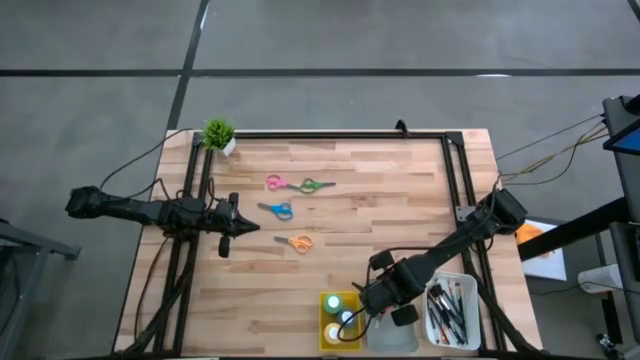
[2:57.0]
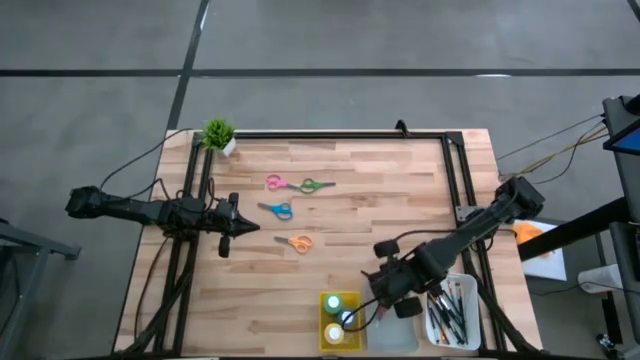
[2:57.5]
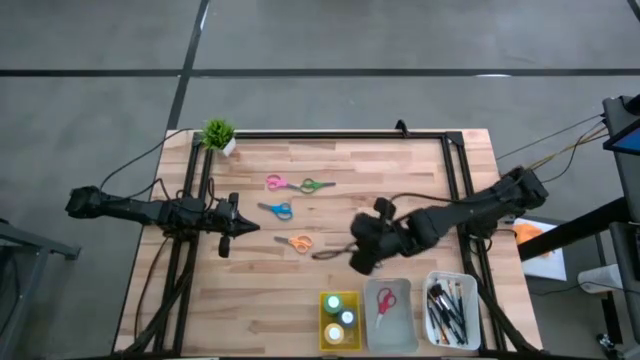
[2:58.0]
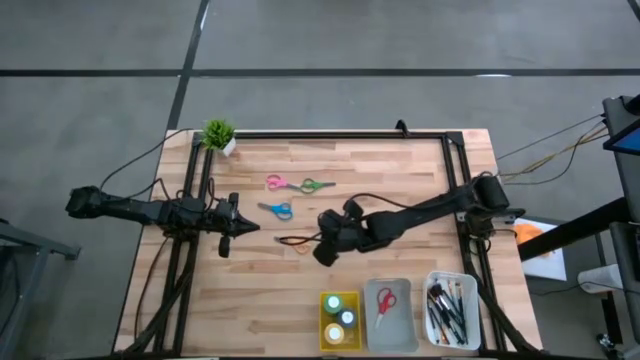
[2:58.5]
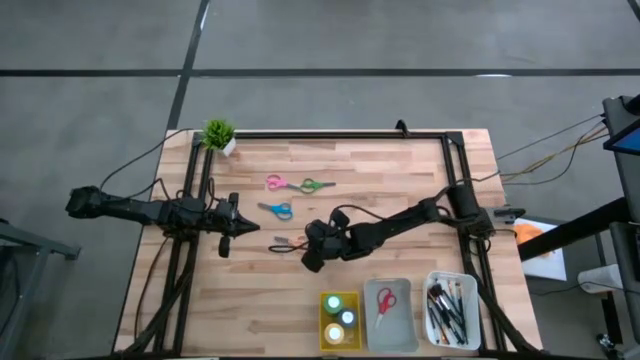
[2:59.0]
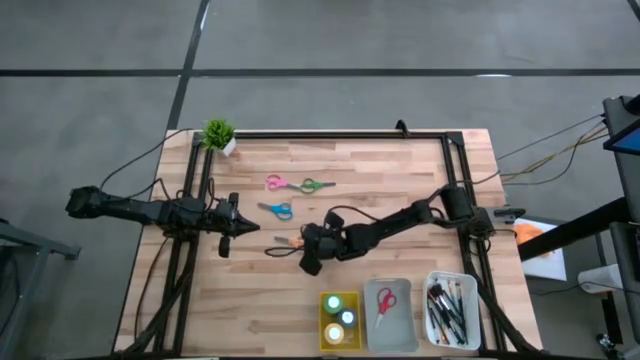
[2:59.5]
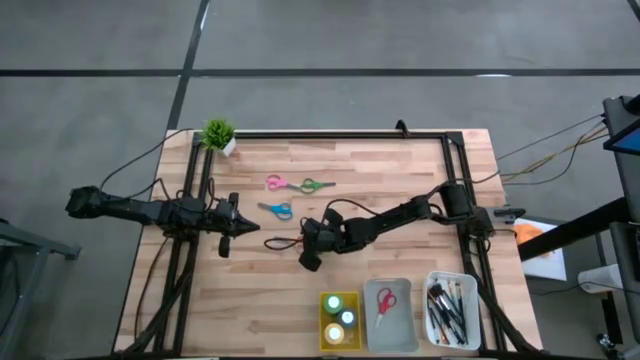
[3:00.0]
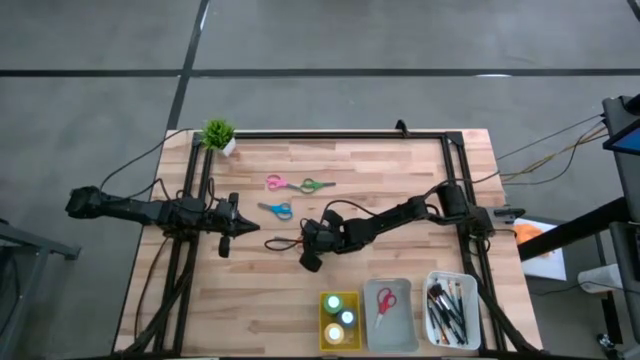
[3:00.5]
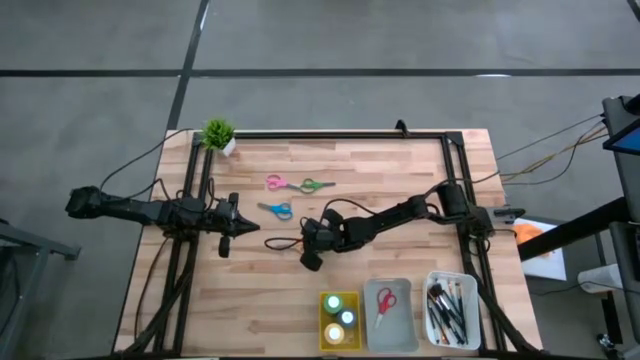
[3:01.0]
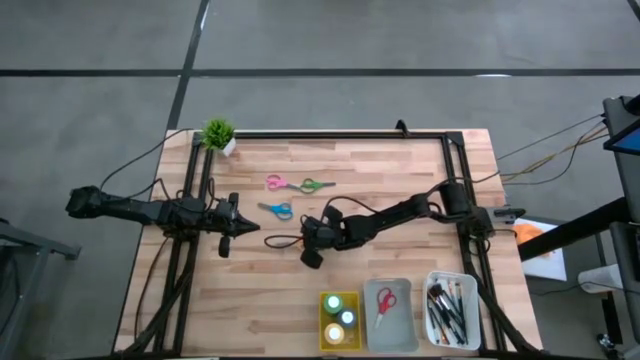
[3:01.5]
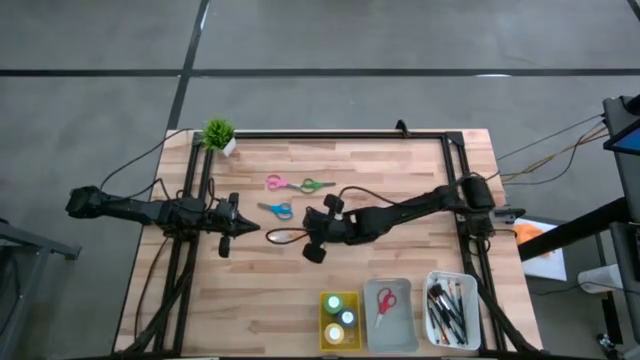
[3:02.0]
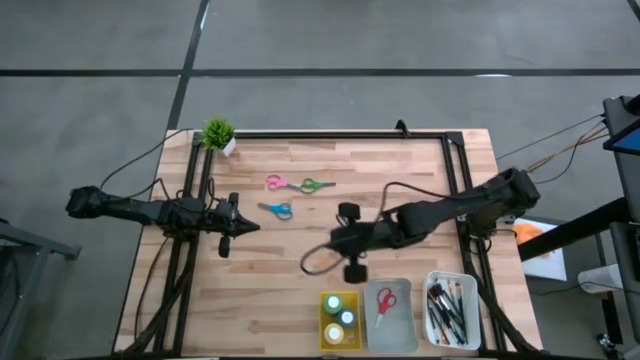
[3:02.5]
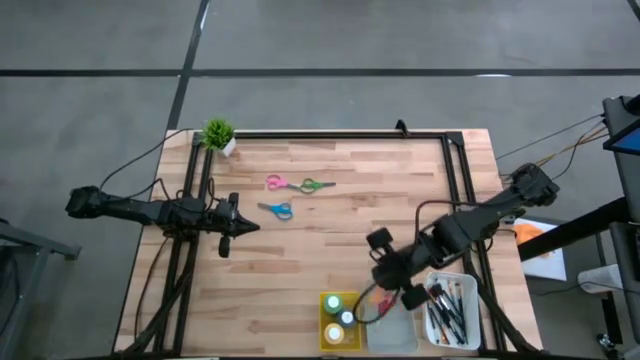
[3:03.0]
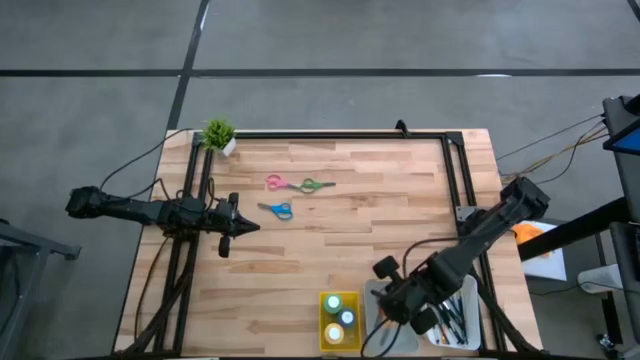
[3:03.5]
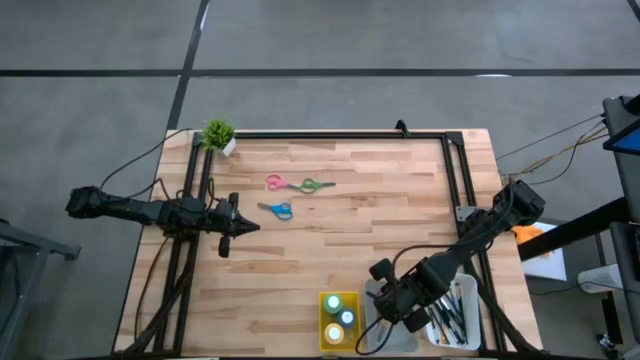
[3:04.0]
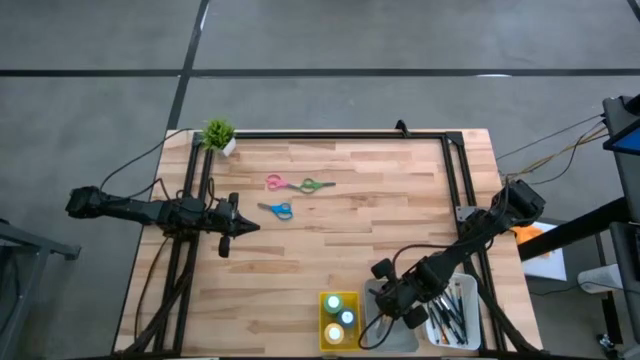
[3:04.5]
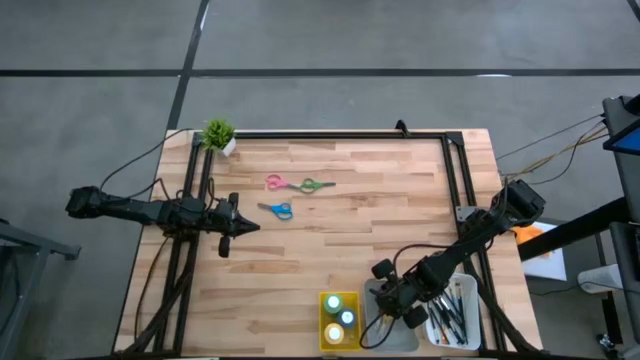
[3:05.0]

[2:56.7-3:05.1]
Task: Pick & Place Paint Supplies
Put the yellow scissors into the gray bin

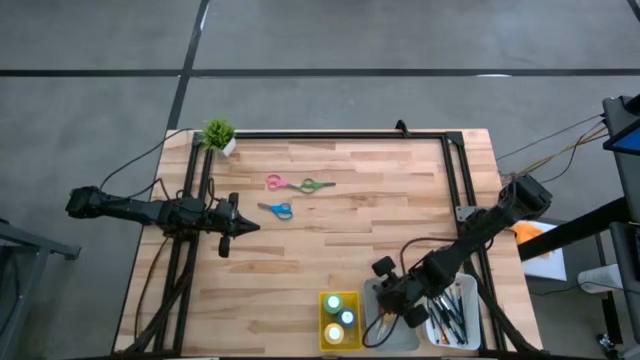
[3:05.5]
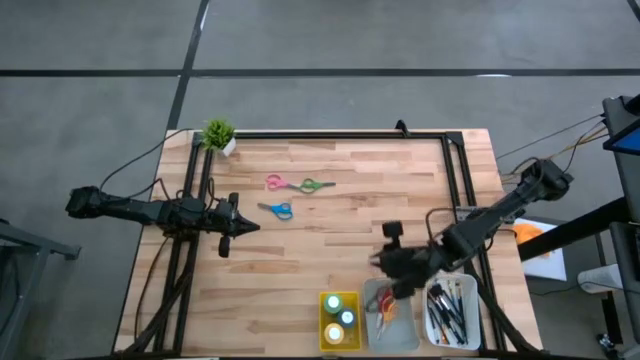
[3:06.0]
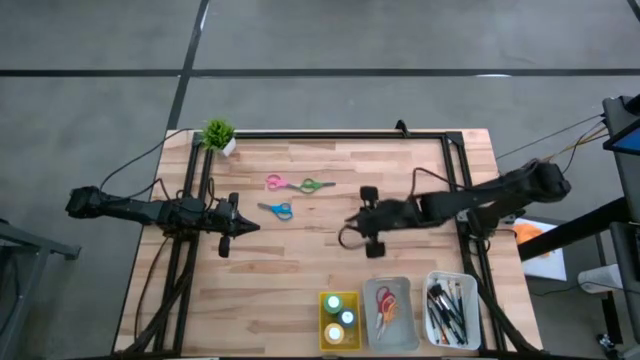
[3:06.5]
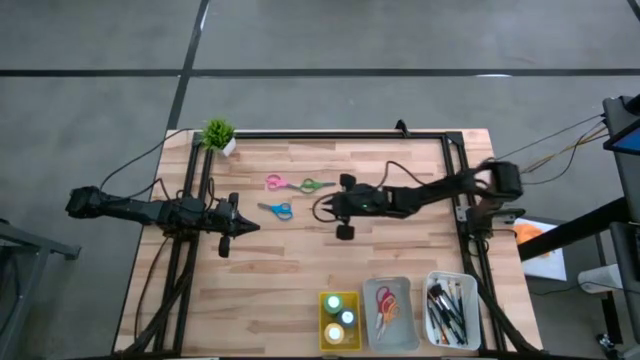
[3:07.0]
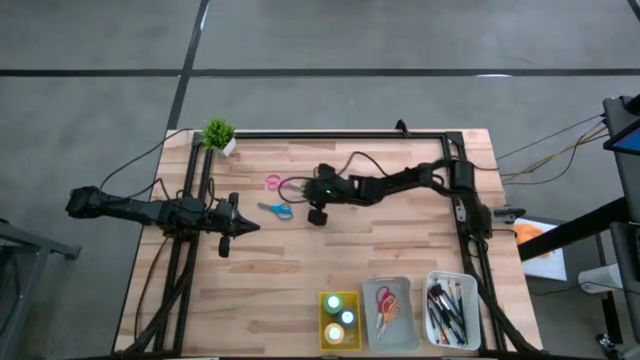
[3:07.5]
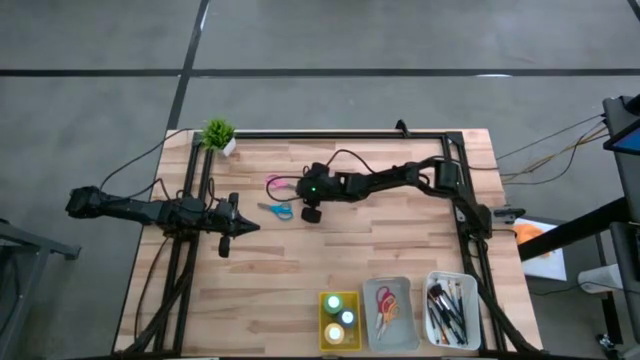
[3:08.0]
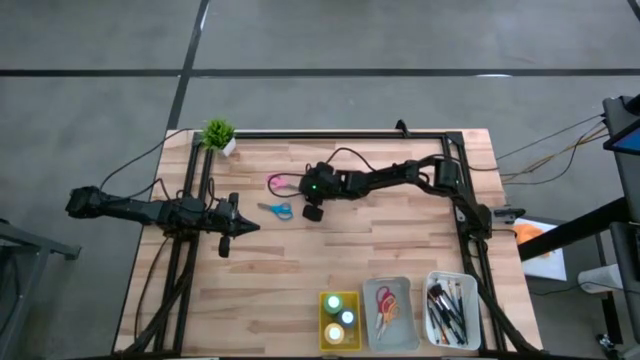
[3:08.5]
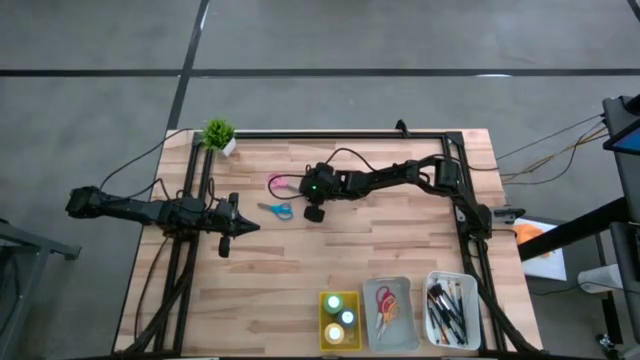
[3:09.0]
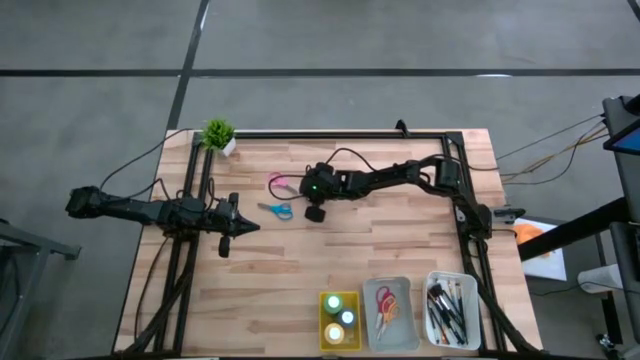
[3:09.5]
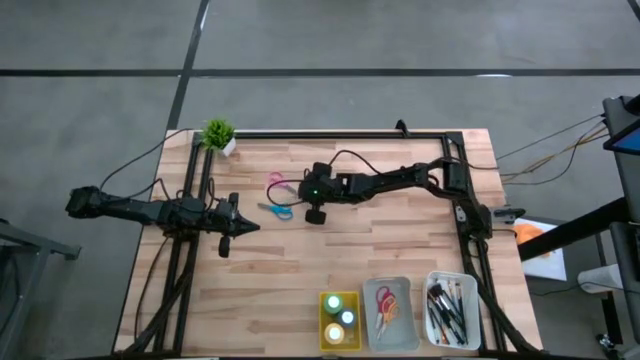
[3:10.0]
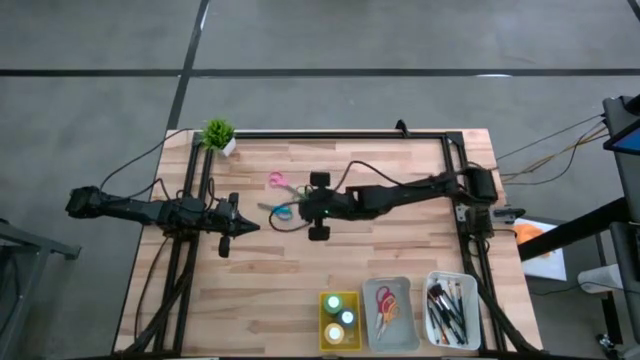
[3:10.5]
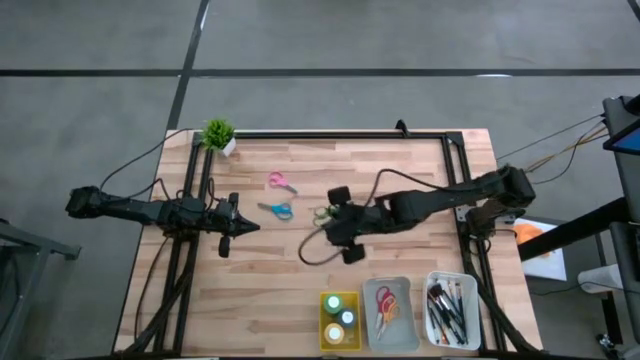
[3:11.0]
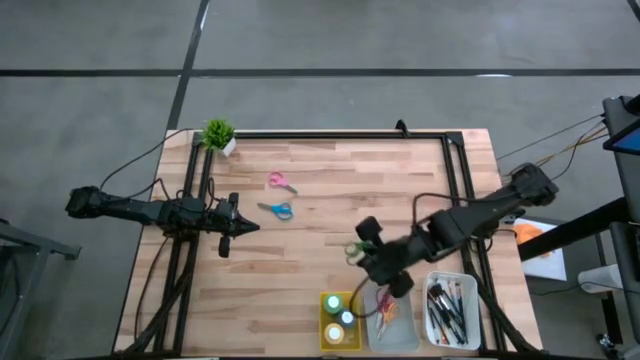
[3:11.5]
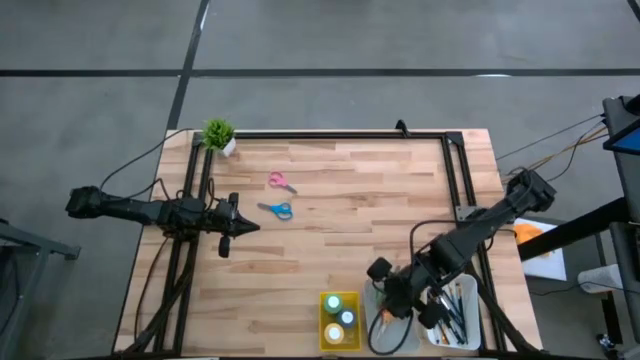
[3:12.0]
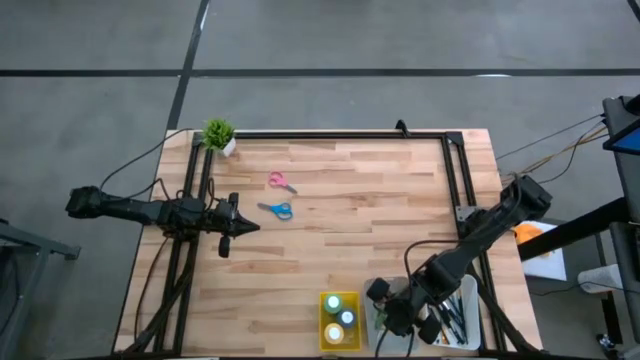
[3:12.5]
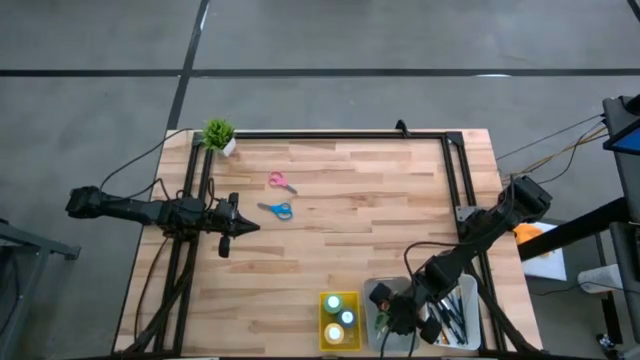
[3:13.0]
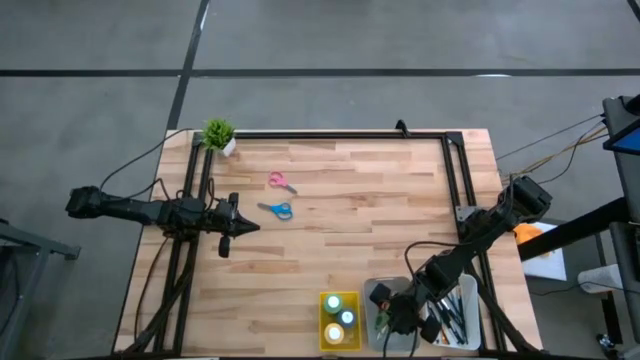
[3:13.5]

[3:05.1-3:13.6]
Put the green scissors into the gray bin
